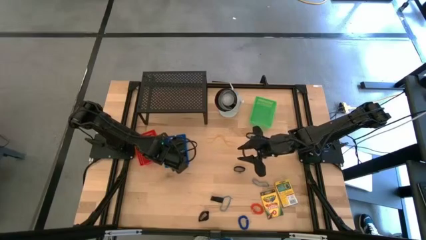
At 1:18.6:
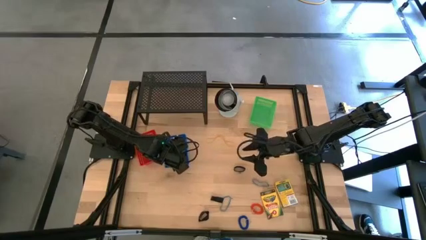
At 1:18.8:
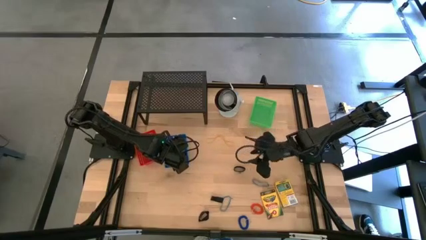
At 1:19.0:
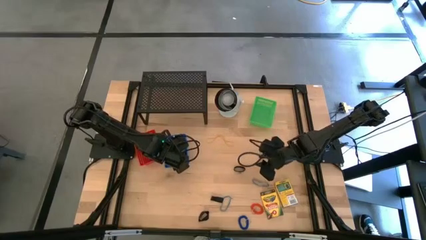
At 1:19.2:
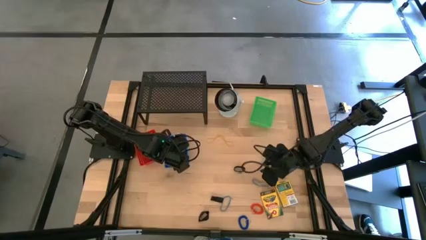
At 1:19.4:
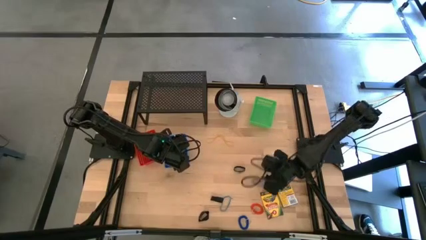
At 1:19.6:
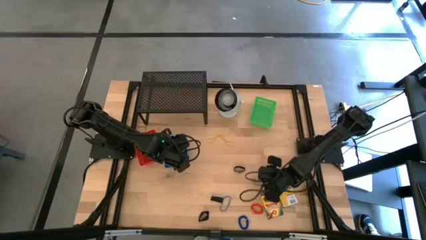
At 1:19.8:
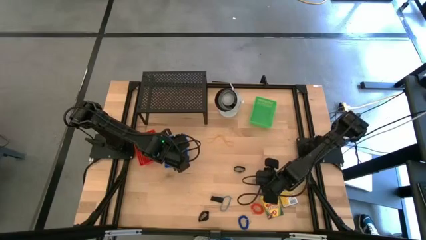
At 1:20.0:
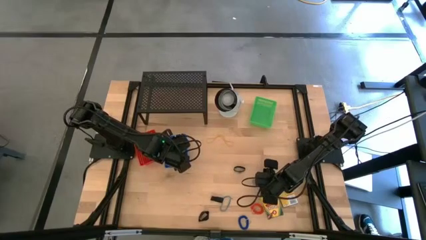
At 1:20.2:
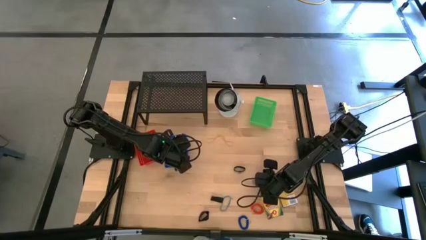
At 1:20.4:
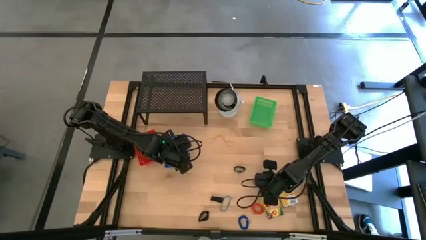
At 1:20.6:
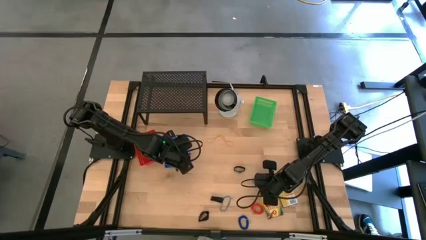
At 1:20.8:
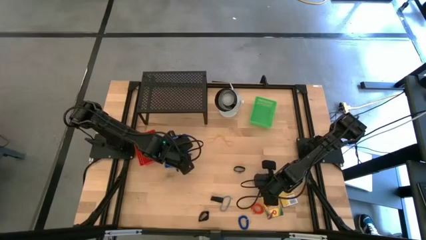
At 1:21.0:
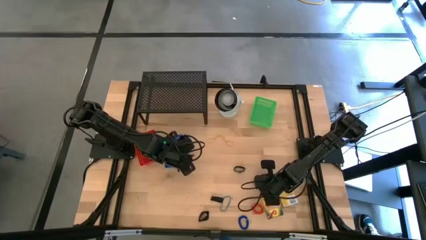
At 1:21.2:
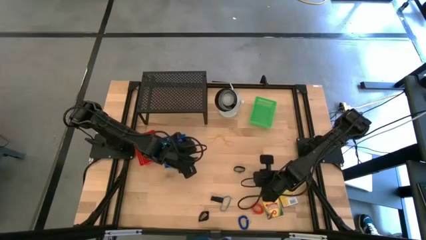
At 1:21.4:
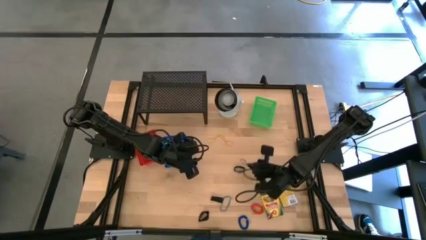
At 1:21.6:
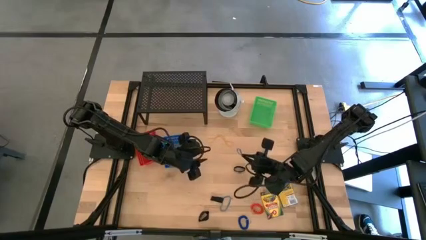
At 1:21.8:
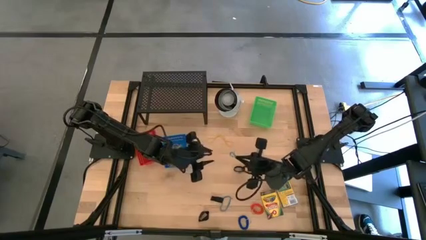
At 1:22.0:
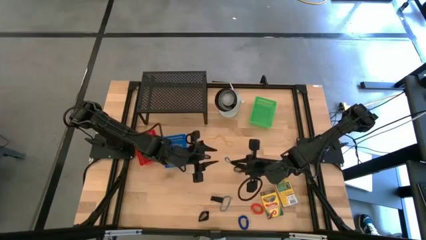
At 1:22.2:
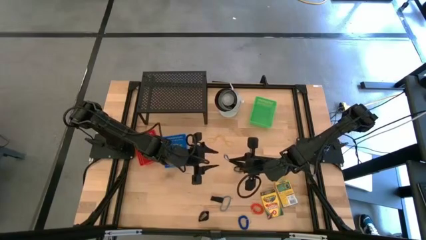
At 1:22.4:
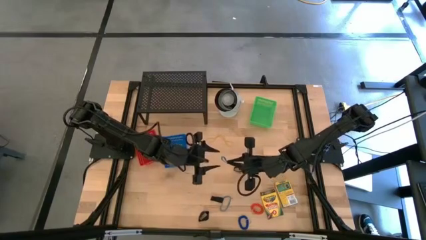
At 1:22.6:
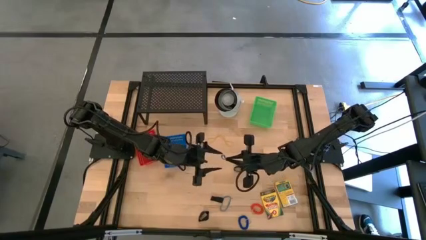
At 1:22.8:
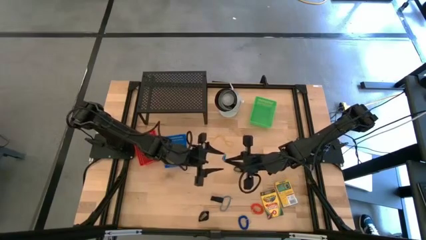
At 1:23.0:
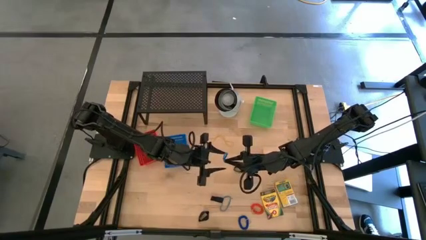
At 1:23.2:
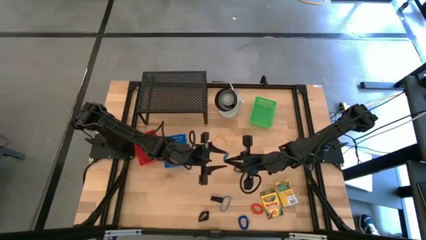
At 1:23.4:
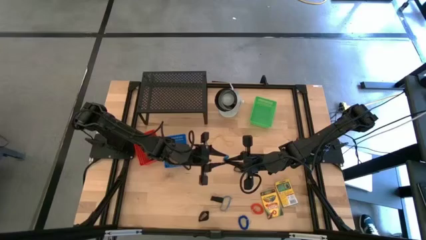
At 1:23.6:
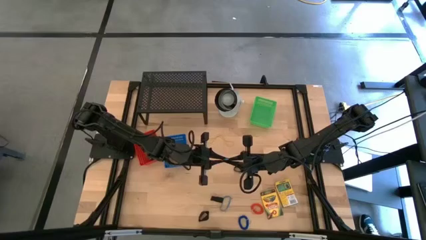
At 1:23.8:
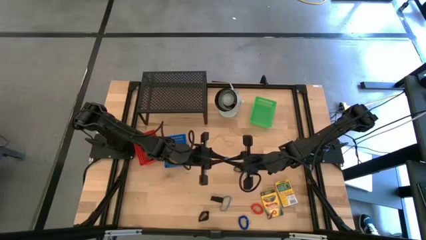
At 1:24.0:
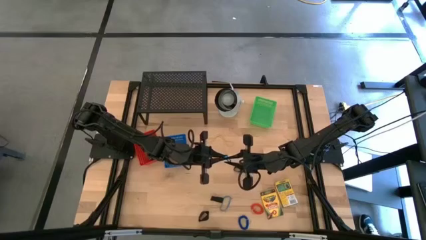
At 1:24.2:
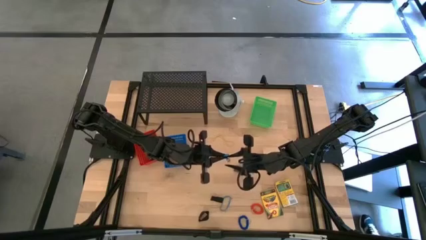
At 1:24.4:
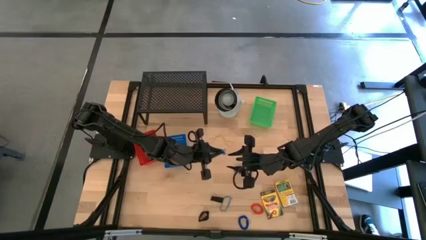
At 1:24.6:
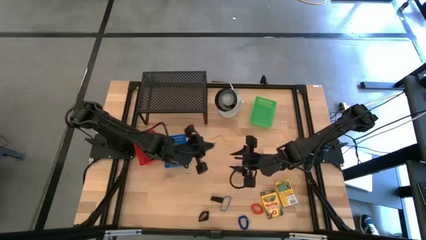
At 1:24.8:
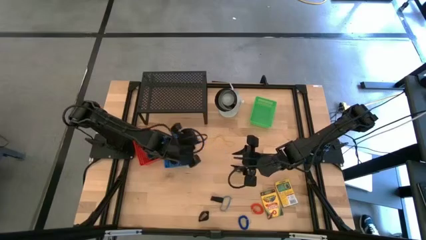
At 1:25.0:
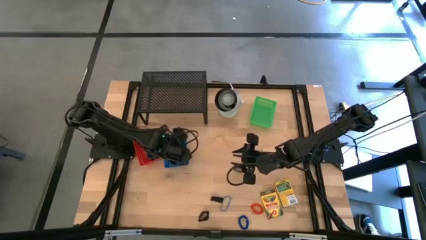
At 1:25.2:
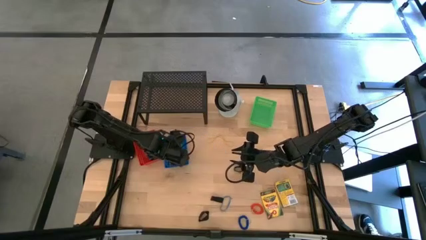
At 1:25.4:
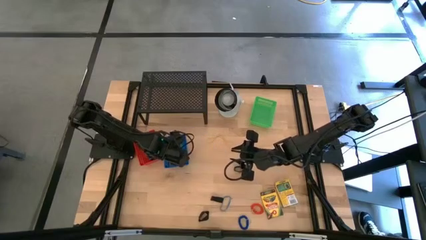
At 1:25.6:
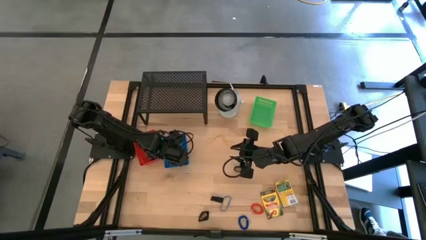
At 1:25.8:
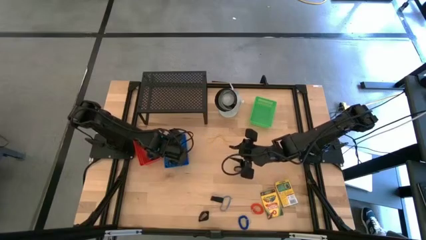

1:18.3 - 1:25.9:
Task: Pick & Place Office Desk Supplies
Put the blue rubber band into the blue bin

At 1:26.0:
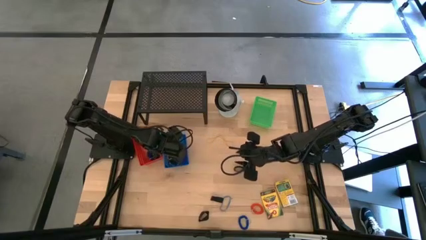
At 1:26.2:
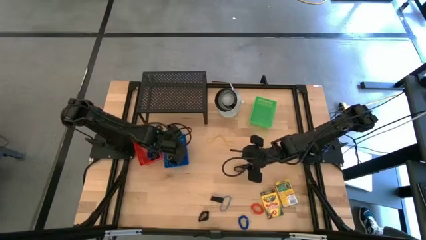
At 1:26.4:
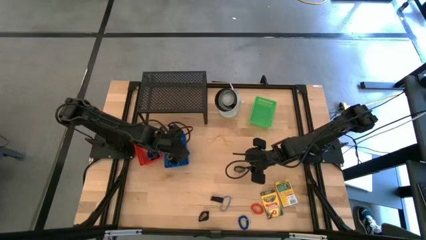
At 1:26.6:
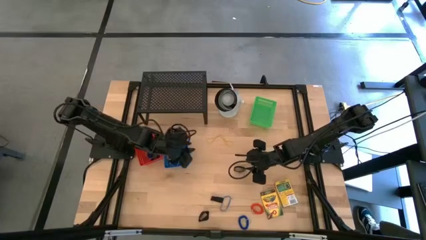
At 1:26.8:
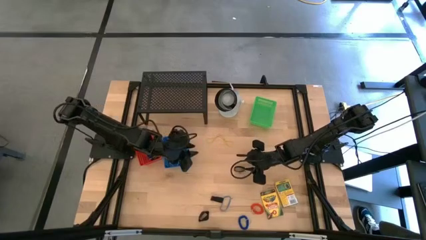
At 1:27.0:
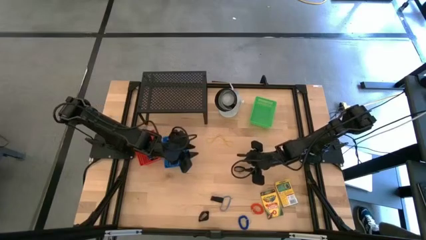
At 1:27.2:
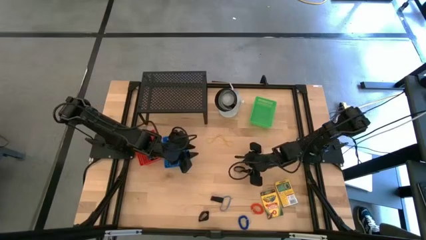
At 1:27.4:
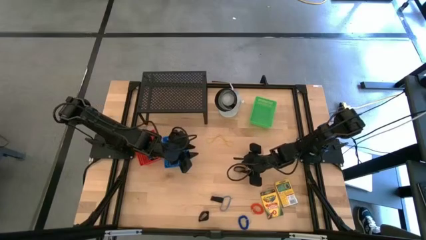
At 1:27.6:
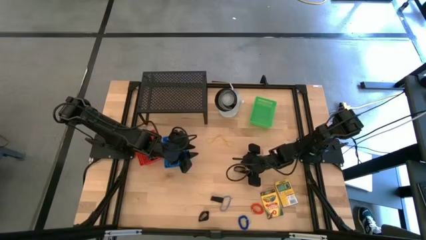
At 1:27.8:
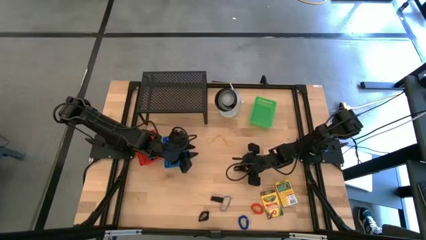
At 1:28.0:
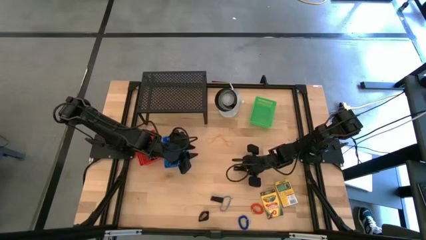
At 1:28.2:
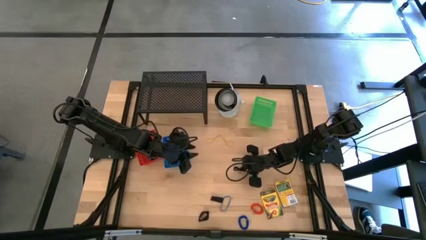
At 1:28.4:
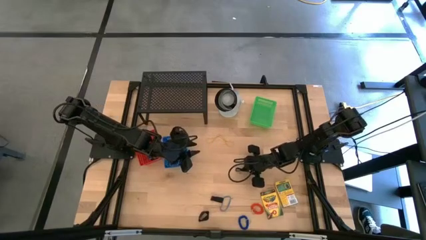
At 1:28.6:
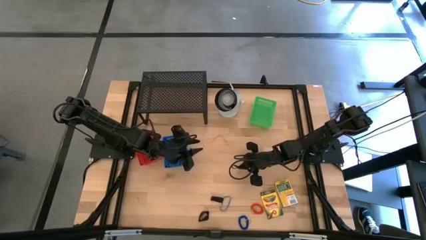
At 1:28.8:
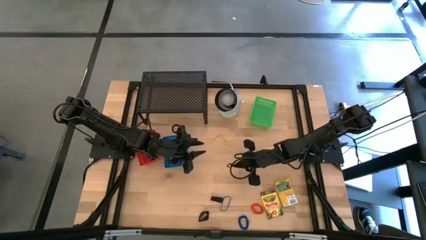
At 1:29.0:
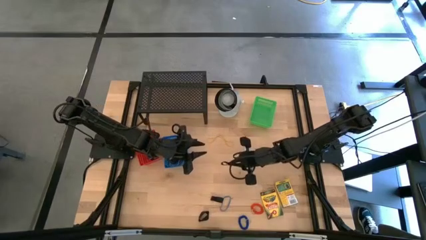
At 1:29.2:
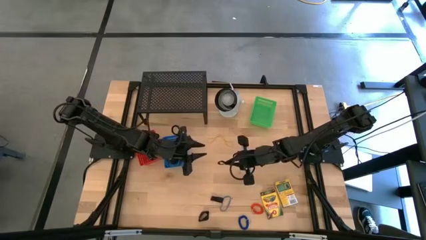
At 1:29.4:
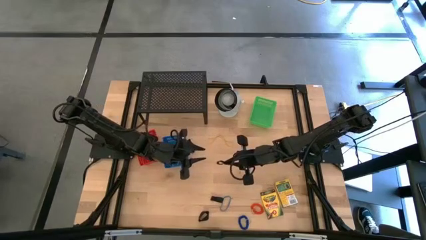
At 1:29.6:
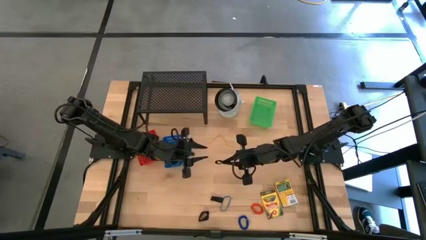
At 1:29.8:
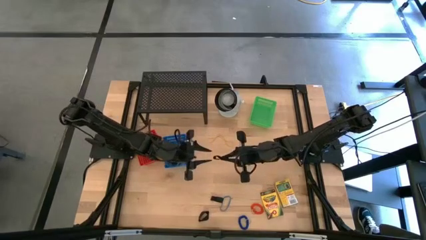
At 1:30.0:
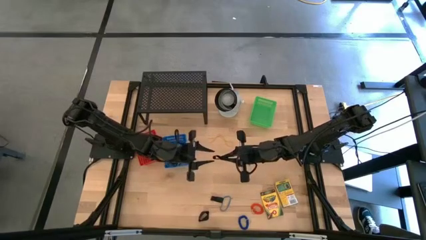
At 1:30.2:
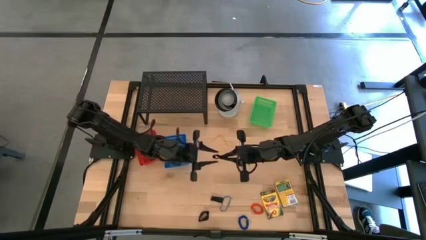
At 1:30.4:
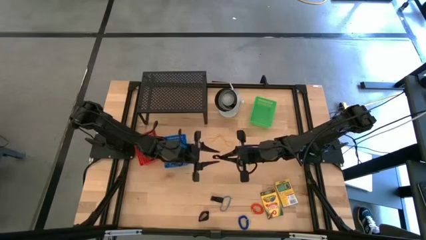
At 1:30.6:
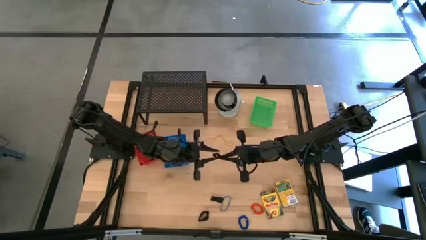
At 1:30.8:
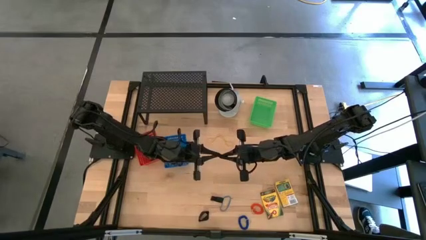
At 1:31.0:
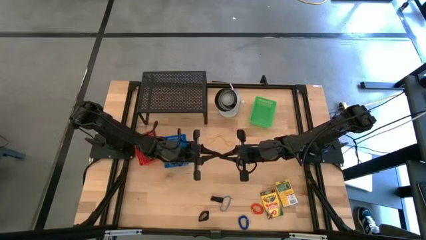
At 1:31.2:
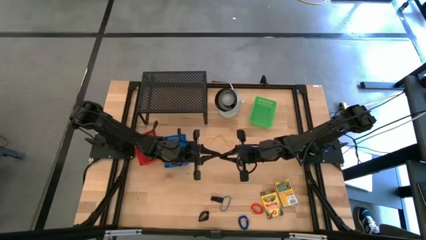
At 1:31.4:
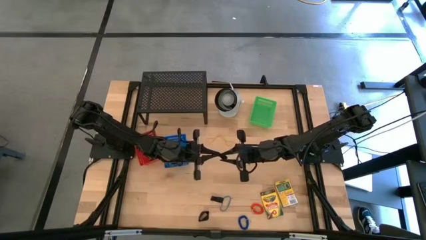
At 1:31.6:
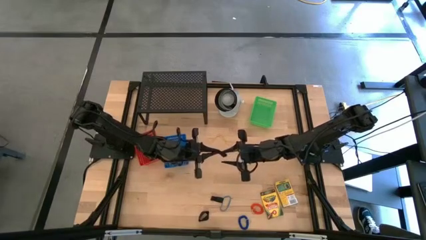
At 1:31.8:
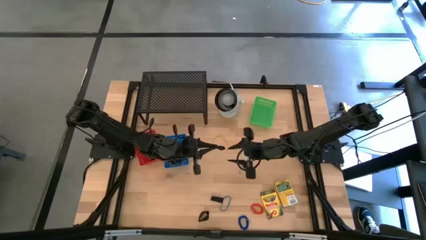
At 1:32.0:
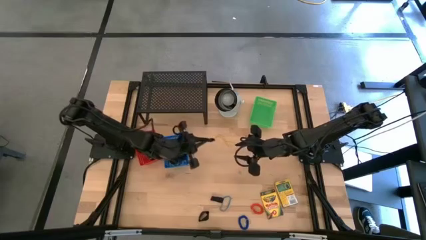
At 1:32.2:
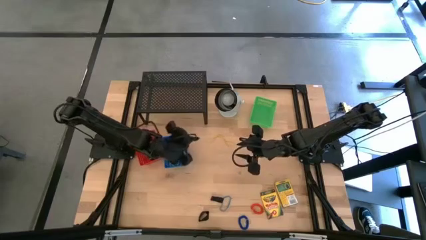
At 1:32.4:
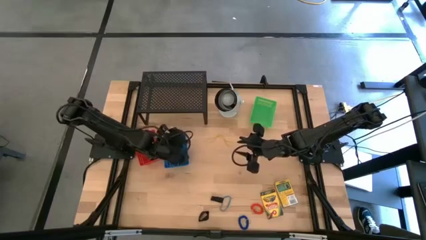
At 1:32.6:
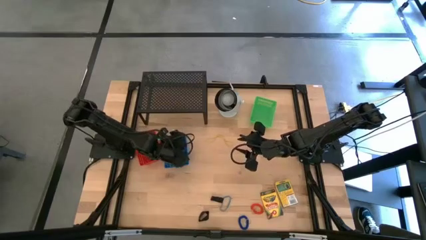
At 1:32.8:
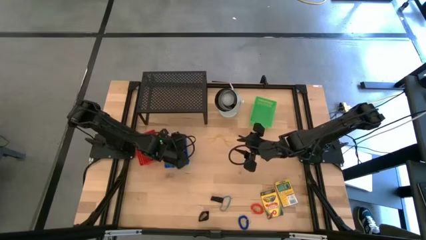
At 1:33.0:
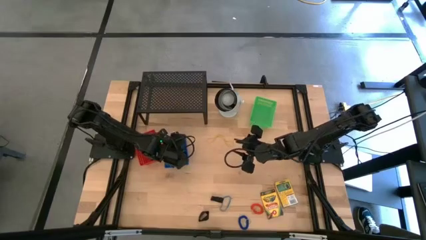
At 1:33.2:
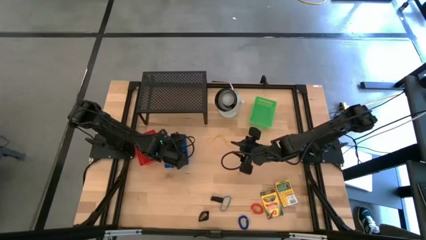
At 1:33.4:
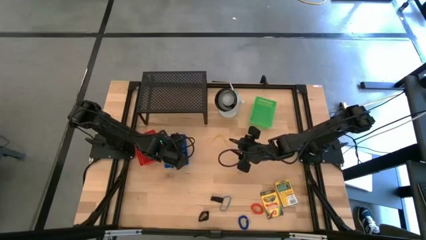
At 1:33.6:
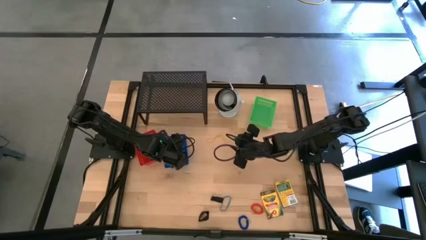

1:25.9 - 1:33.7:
Put the black rubber band into the blue bin

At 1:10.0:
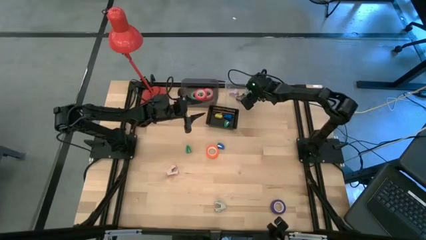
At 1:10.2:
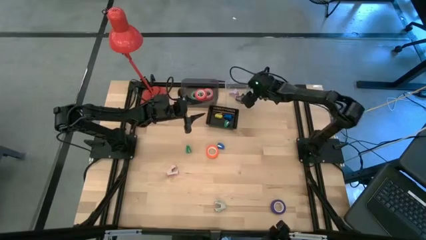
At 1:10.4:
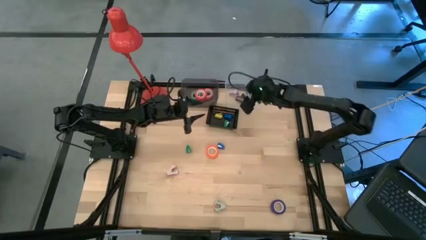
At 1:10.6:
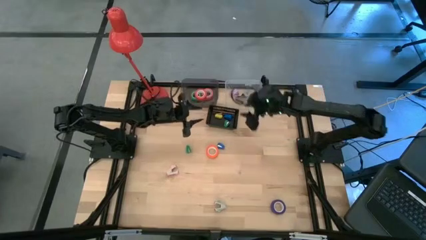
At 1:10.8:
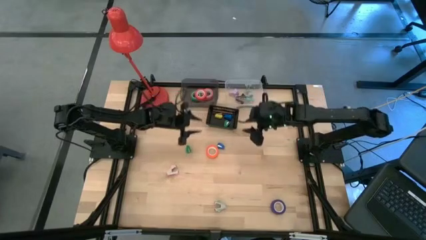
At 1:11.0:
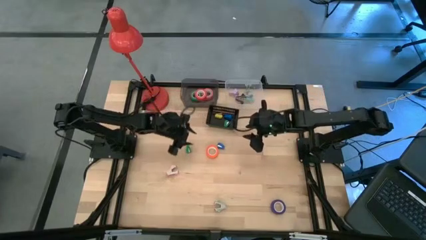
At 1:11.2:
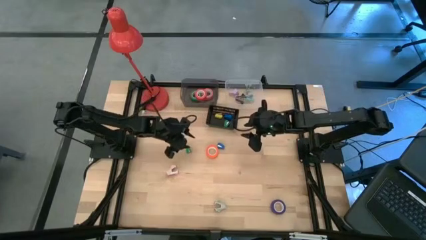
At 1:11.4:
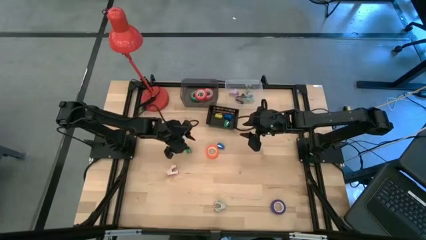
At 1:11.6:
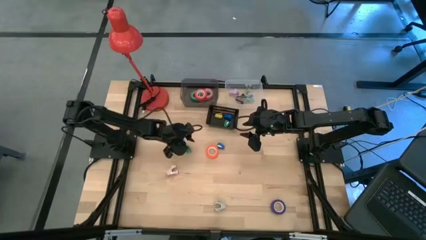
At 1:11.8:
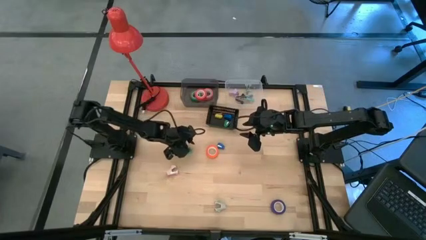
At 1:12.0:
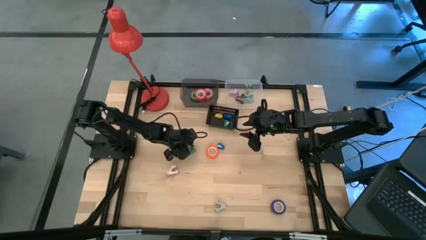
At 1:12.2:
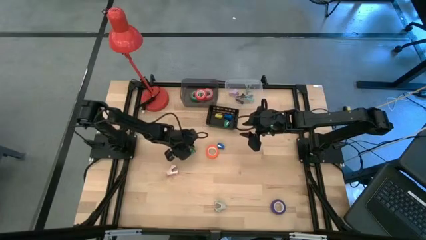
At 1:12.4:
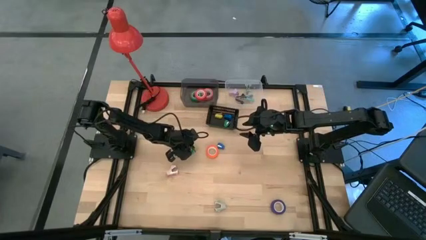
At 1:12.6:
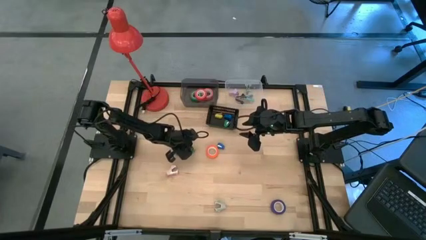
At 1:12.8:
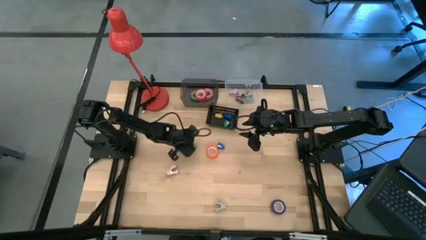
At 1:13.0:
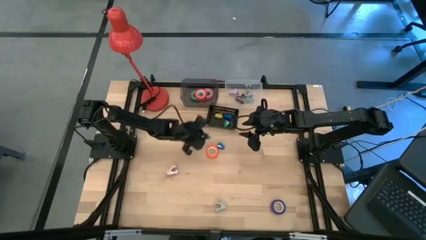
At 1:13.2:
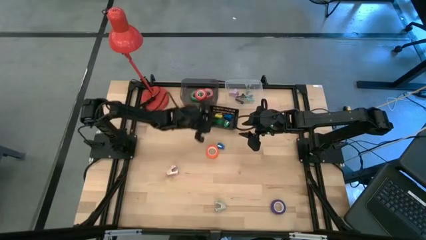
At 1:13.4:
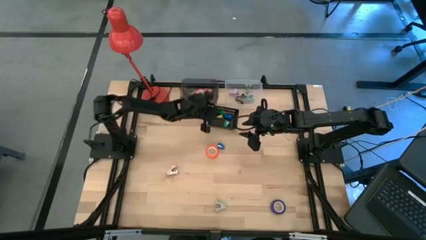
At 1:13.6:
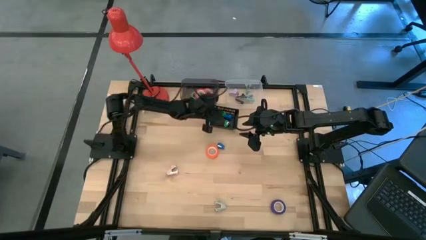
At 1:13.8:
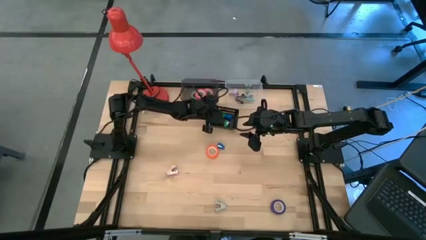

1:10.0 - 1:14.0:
Task: Pick and place Stapler, Stapler remover, tape
Put the green mini-stapler into the black bin
